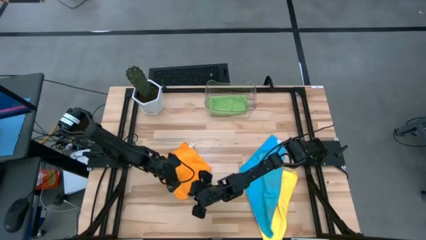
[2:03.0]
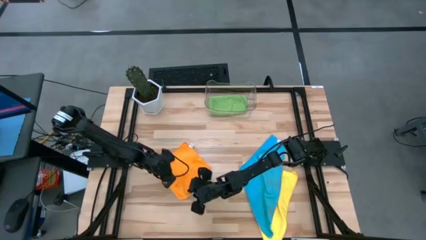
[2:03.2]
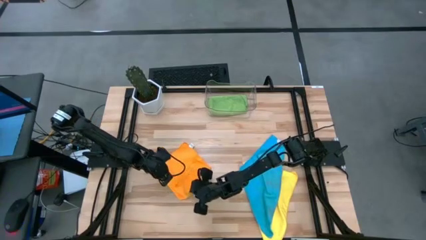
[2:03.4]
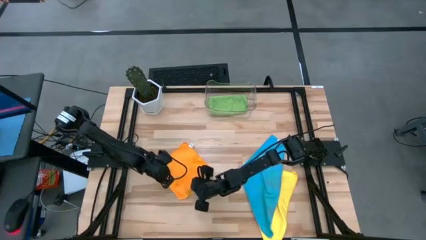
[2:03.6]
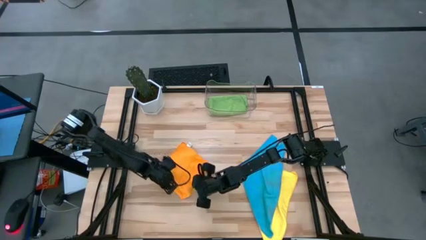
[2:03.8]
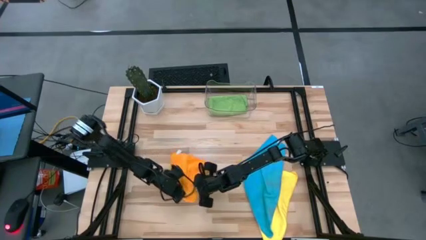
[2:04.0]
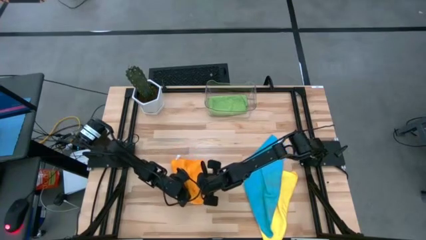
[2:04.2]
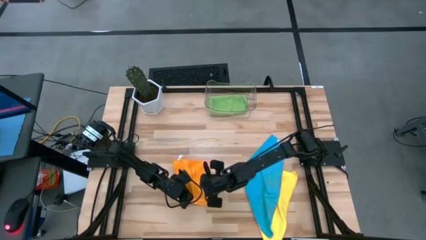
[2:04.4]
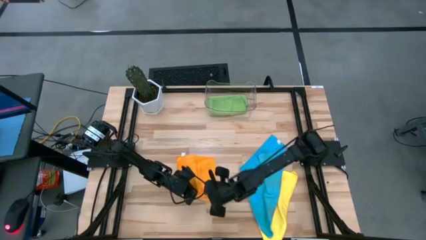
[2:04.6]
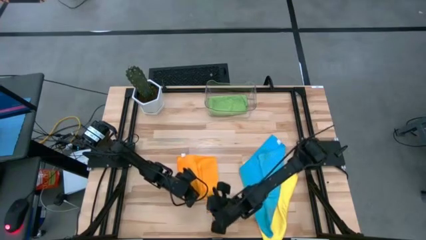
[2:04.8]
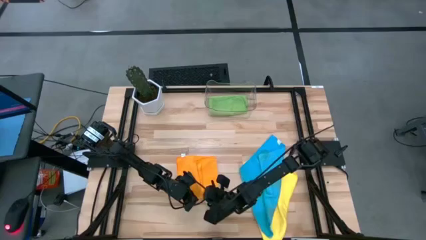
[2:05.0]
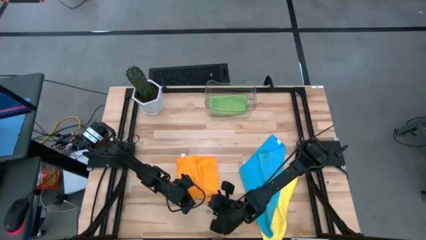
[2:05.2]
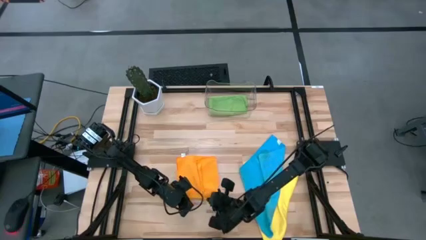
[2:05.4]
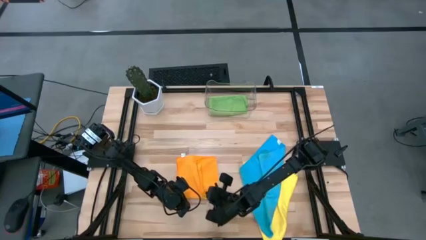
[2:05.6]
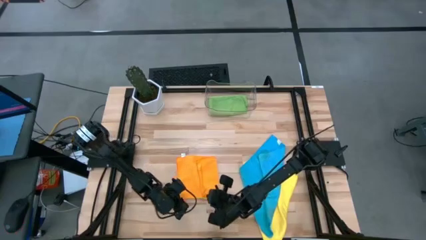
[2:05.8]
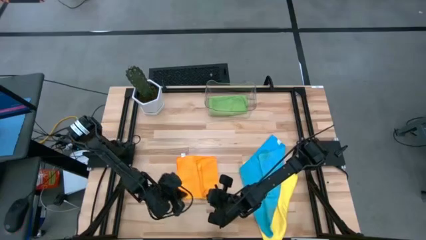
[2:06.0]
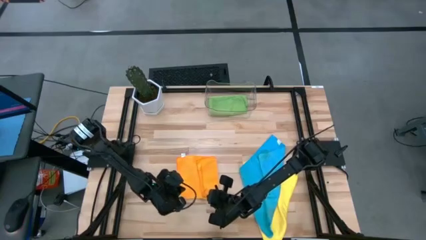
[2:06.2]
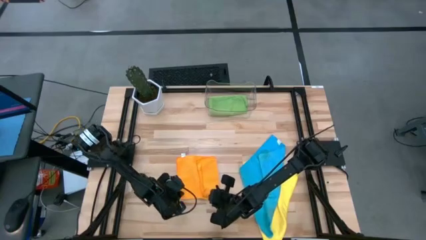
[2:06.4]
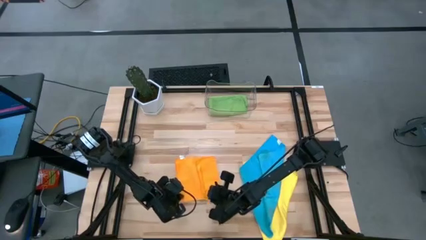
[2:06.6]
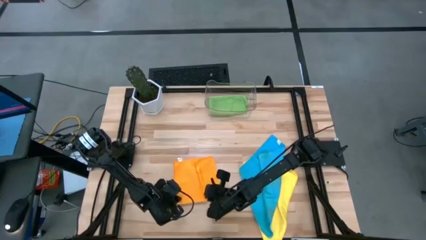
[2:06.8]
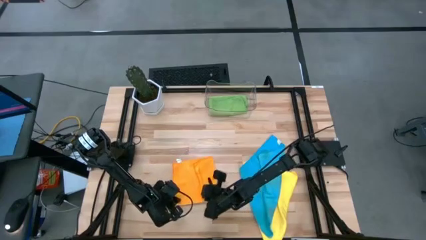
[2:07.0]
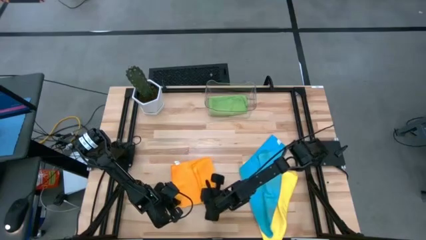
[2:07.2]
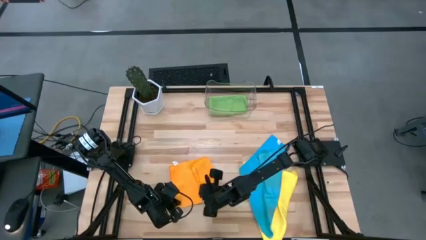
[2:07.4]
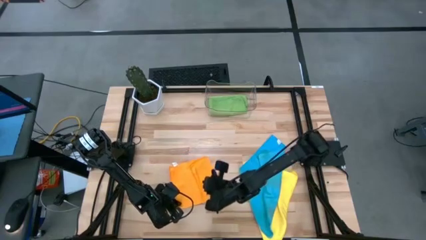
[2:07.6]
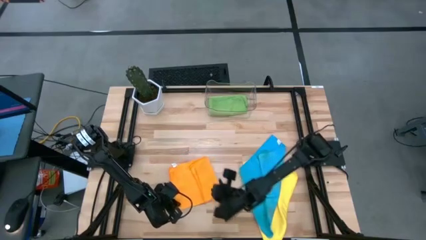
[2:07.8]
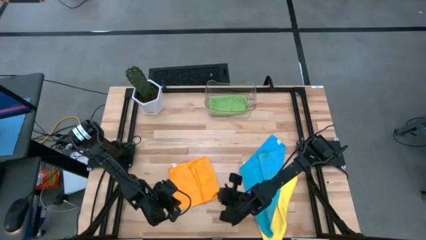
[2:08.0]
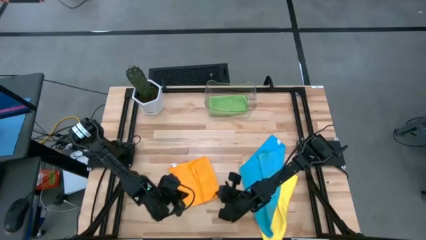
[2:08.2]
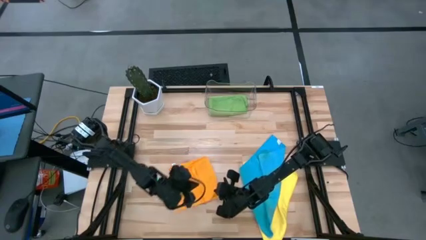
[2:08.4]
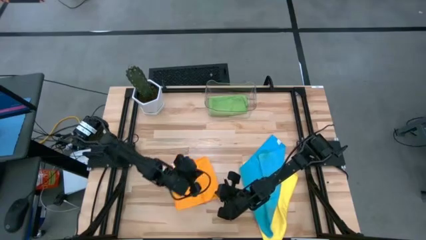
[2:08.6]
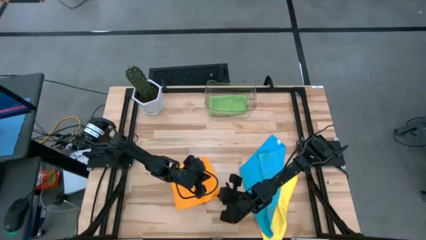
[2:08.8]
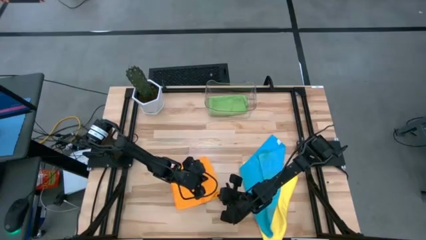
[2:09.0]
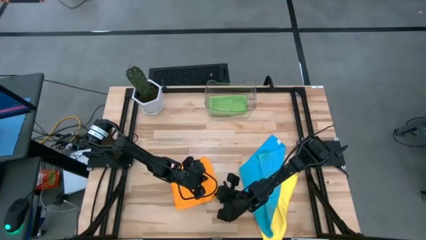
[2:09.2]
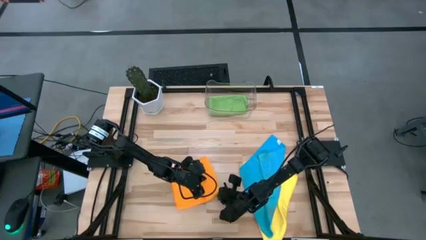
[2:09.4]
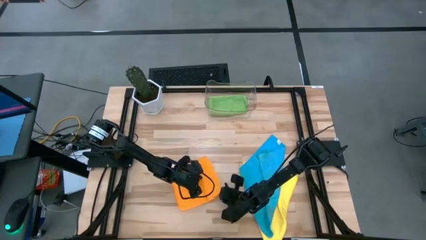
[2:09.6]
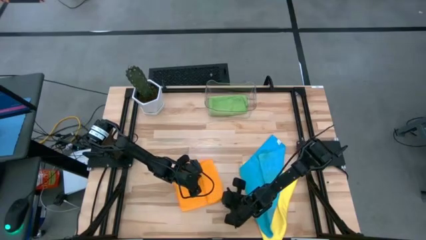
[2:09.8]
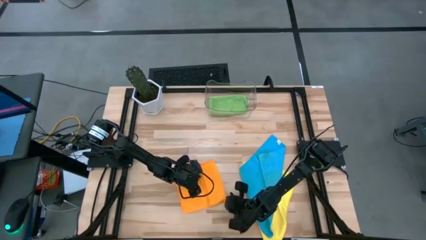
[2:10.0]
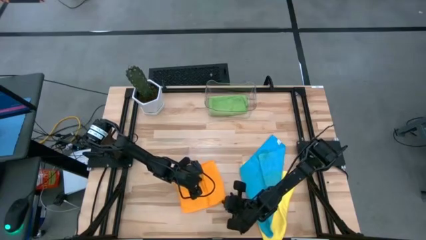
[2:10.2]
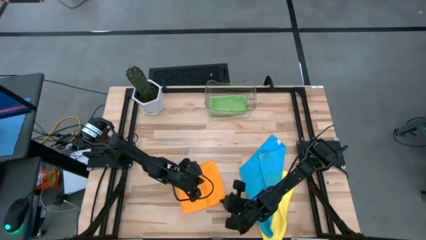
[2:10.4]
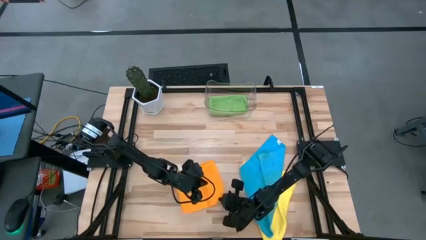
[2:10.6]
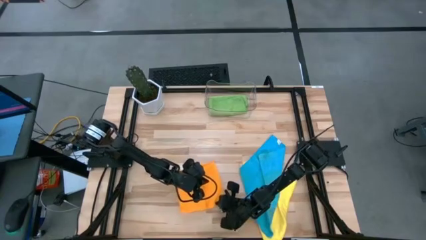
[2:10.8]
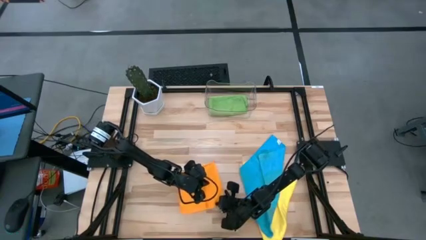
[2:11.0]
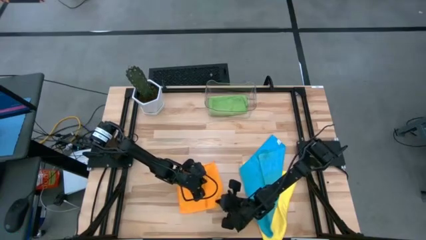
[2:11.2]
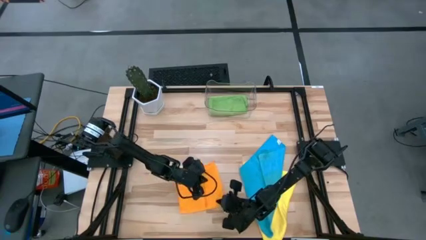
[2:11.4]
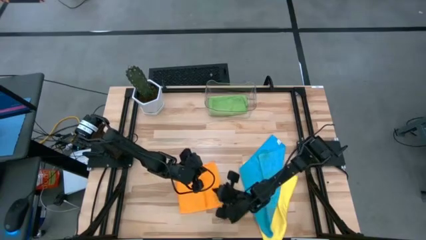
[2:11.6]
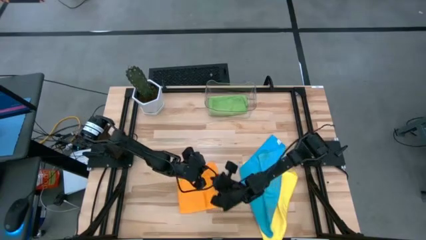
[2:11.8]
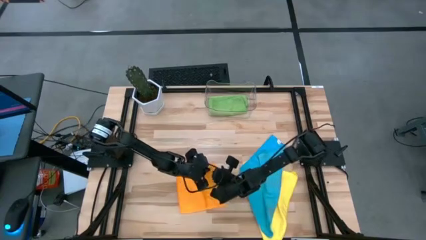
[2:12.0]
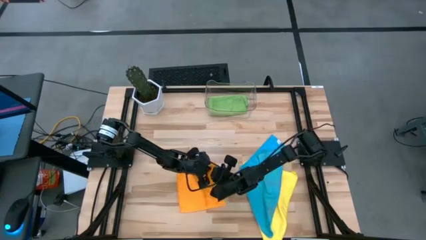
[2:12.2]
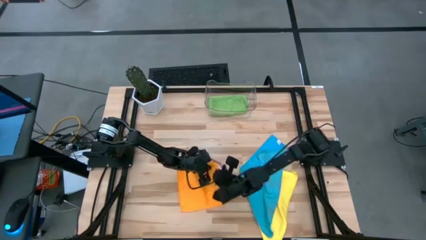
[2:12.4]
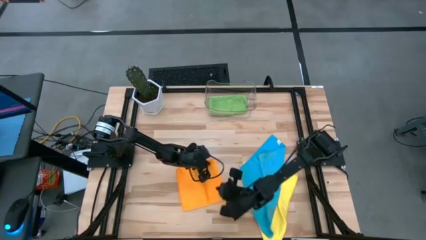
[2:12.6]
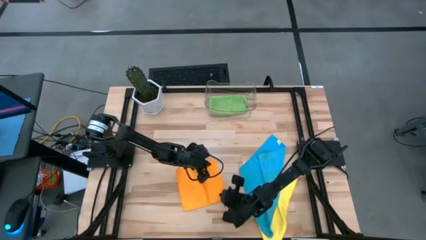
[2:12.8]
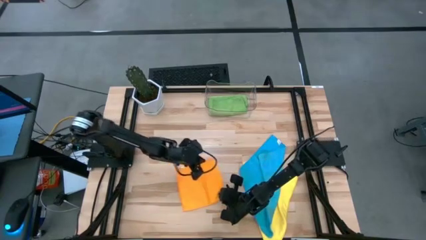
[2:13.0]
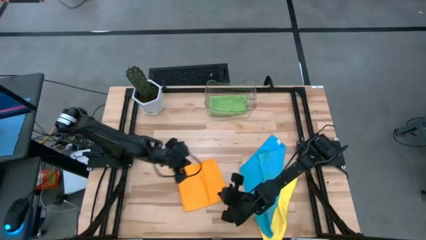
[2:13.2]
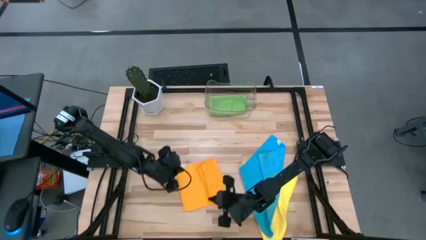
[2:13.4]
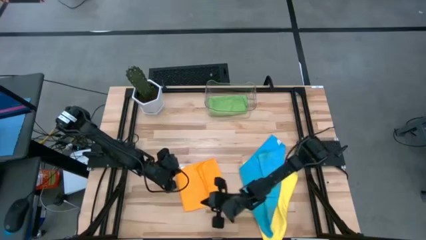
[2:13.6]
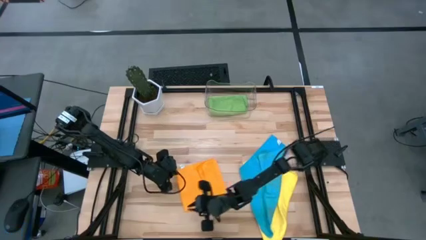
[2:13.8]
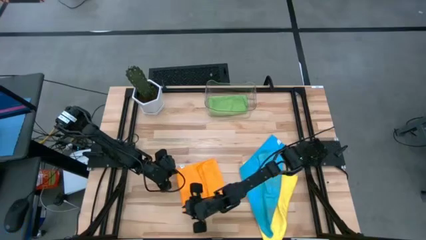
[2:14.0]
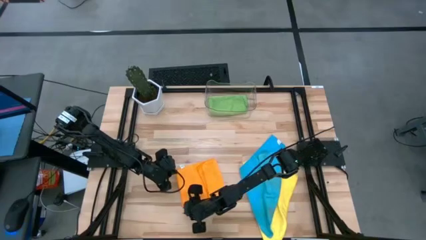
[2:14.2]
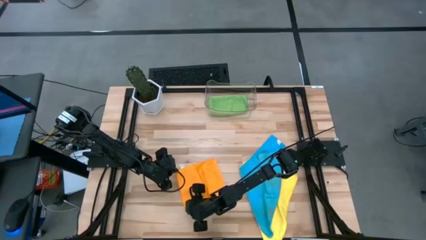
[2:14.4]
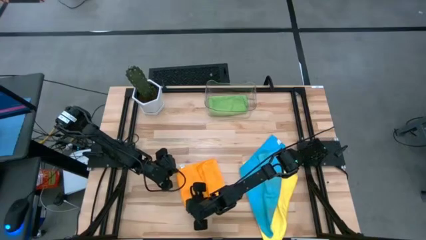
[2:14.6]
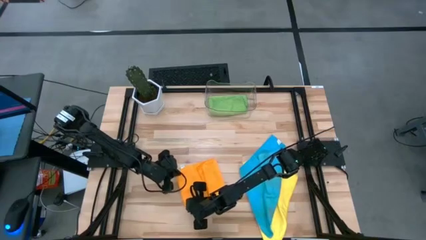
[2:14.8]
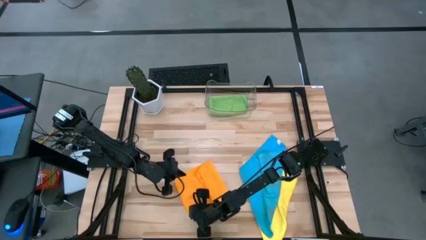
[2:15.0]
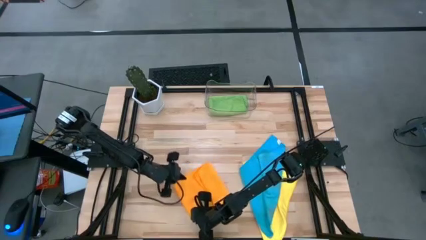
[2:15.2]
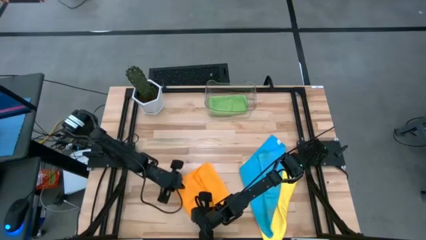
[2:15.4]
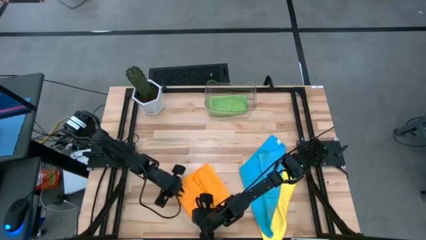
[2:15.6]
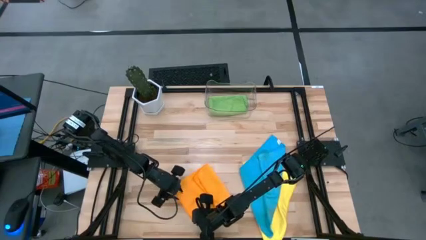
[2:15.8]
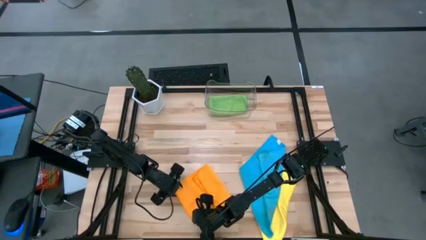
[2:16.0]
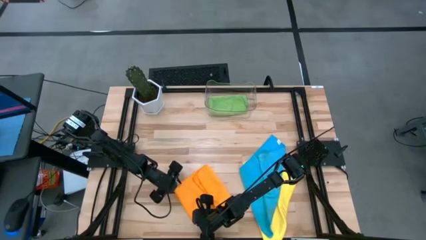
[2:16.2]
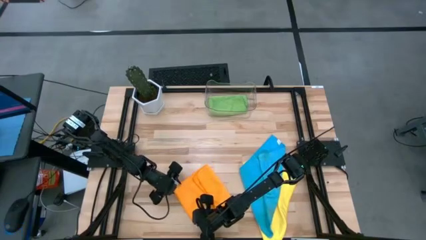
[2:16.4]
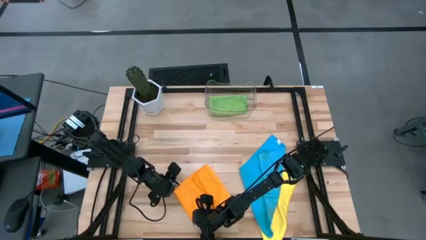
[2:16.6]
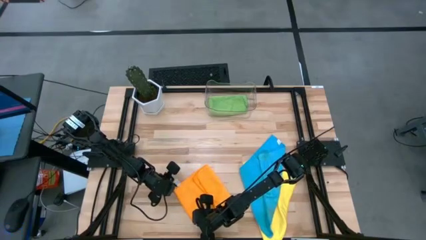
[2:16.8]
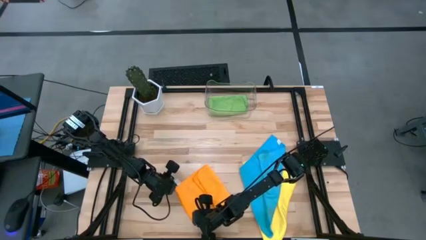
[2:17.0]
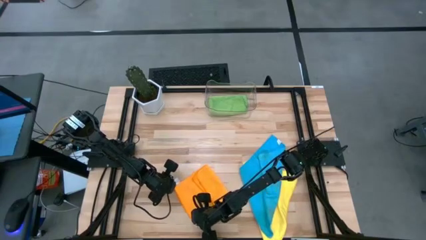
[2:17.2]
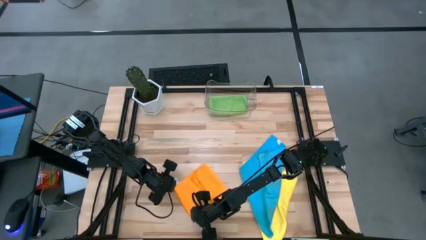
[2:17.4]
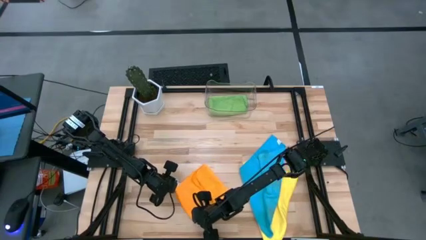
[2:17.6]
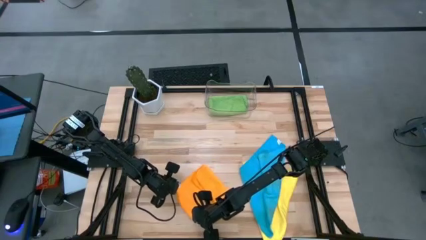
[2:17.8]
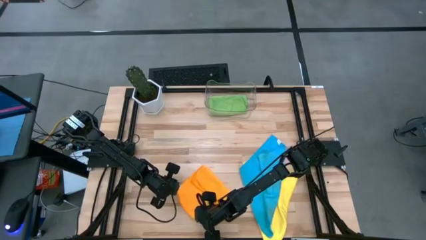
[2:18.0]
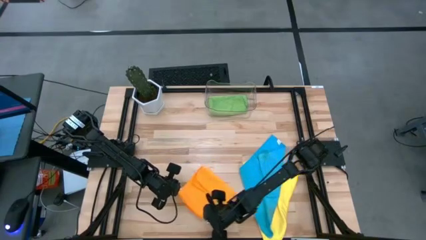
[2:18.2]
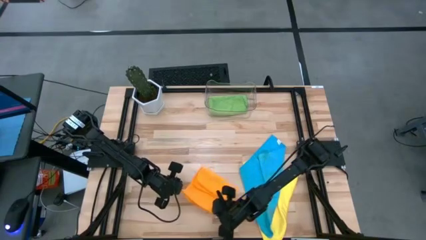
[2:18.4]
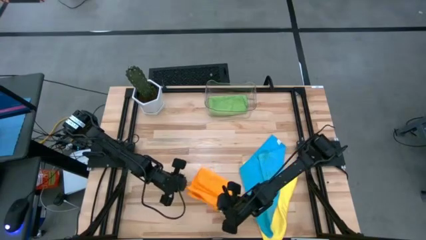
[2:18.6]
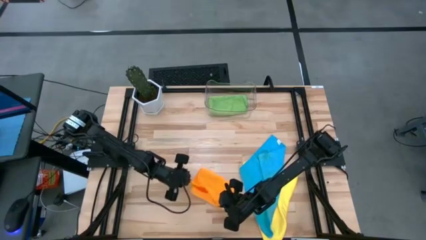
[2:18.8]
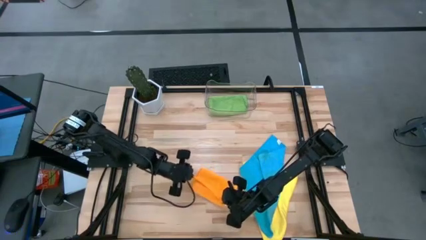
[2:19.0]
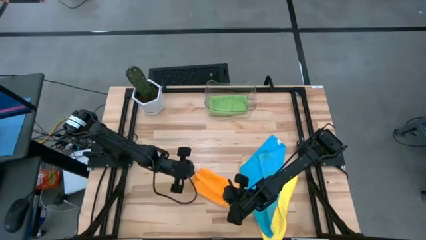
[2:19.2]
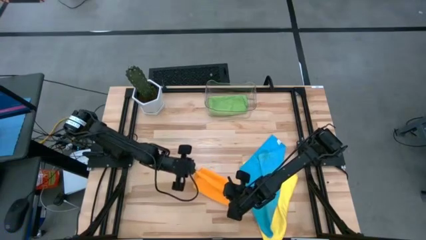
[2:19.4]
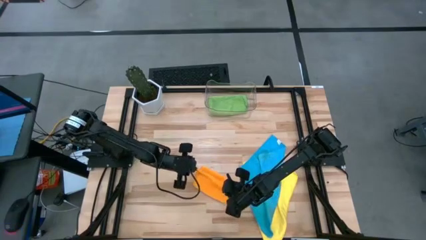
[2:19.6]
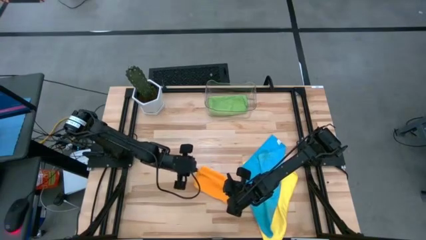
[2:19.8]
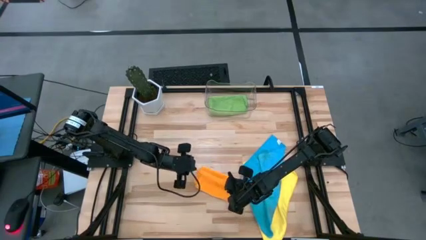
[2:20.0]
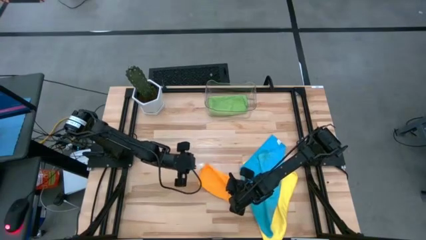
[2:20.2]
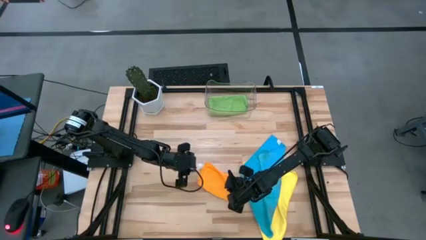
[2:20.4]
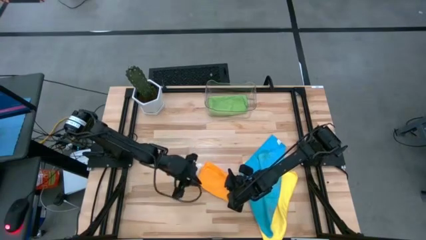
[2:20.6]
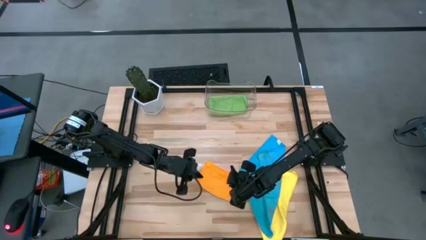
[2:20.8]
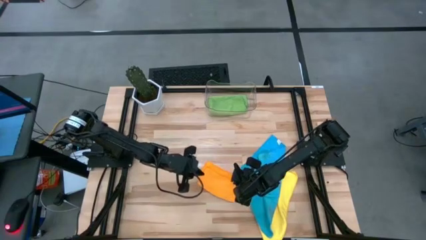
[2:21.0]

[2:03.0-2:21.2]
Task: Fold microfiber towels
Fold the orange towel
